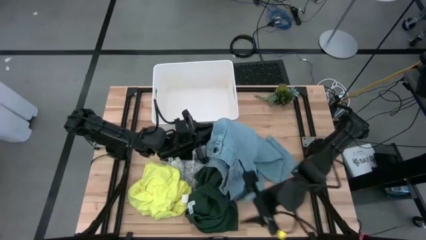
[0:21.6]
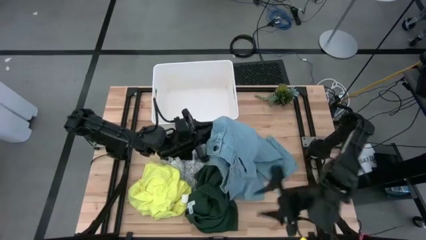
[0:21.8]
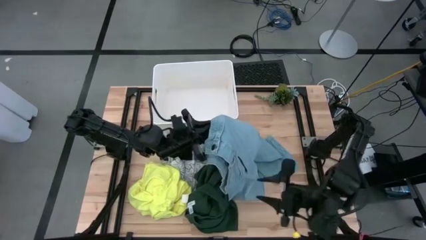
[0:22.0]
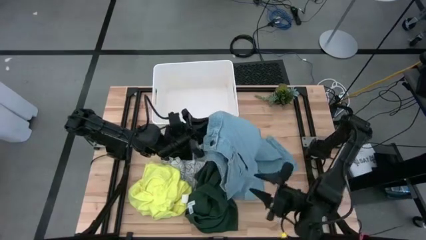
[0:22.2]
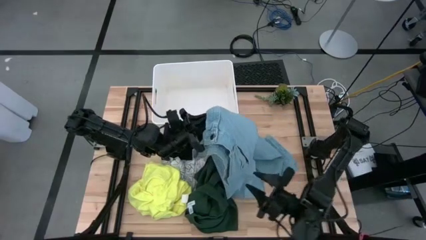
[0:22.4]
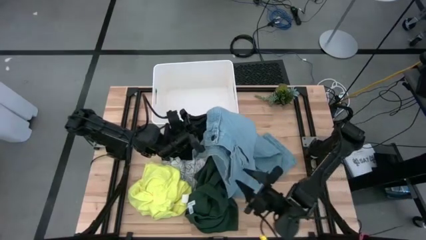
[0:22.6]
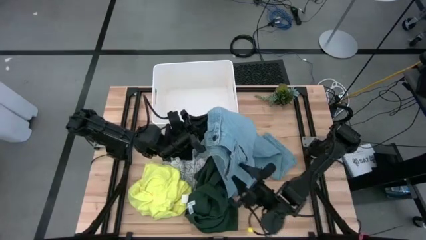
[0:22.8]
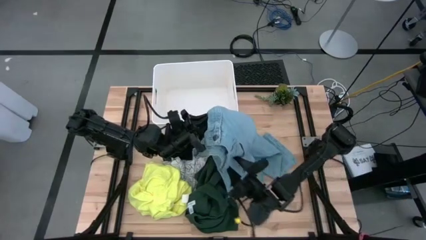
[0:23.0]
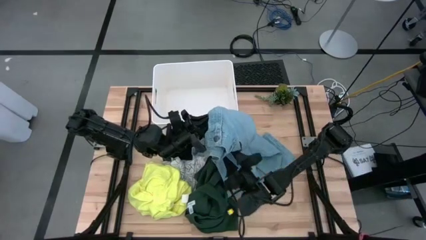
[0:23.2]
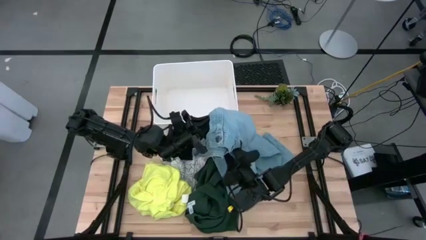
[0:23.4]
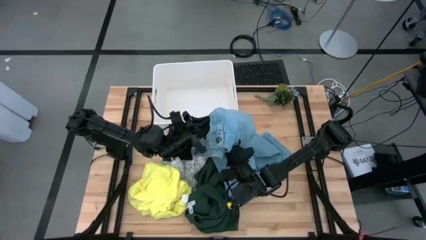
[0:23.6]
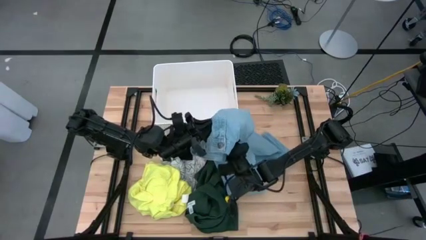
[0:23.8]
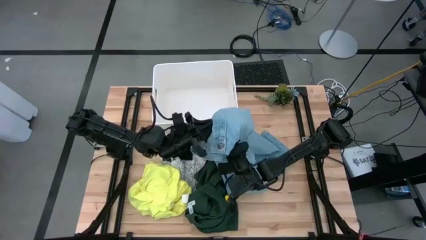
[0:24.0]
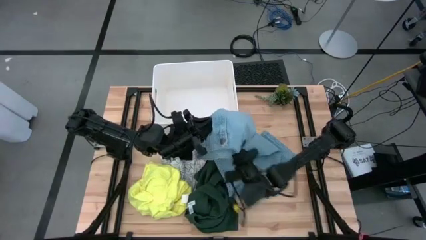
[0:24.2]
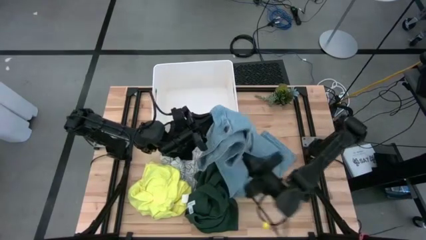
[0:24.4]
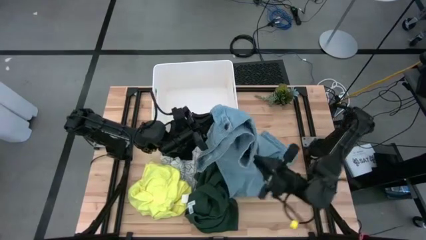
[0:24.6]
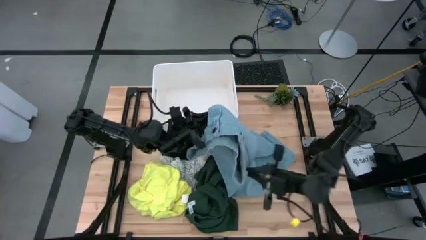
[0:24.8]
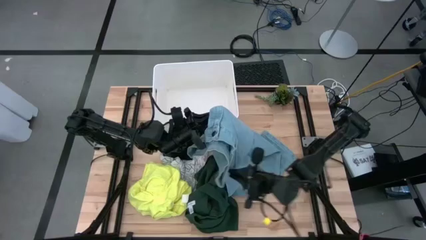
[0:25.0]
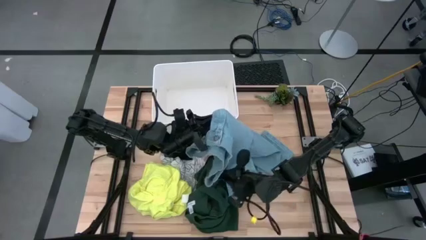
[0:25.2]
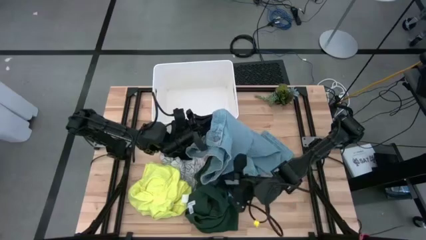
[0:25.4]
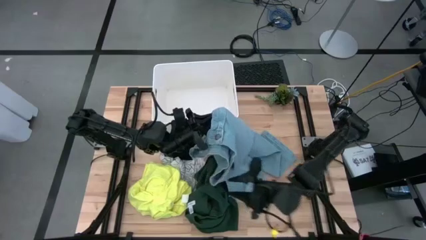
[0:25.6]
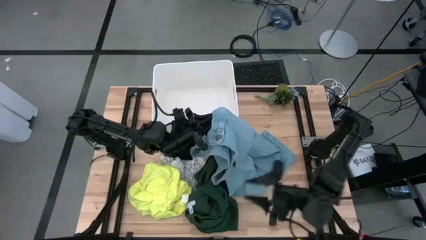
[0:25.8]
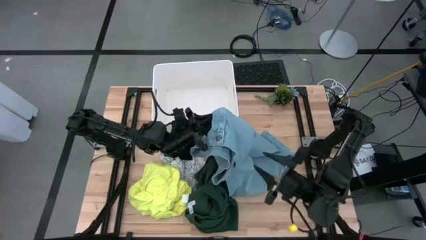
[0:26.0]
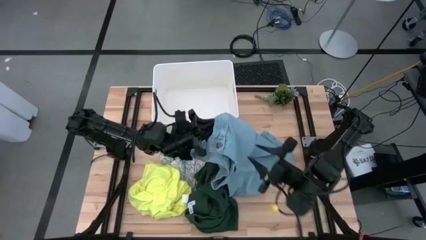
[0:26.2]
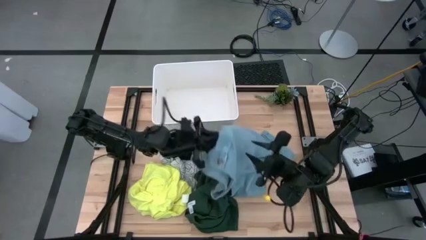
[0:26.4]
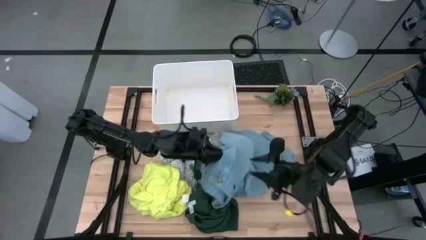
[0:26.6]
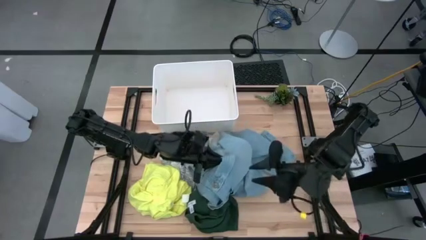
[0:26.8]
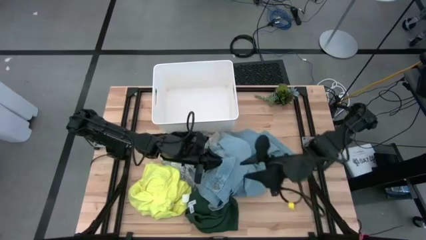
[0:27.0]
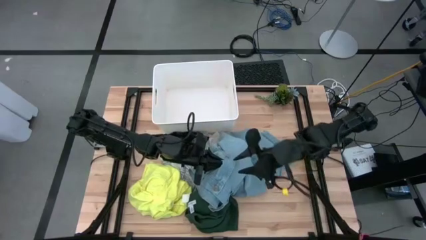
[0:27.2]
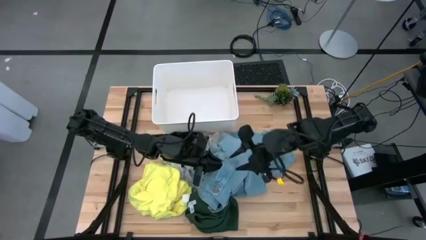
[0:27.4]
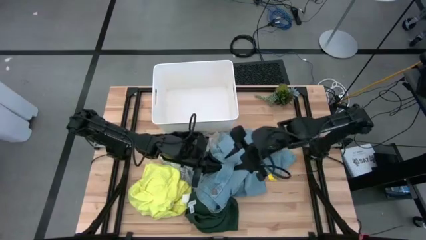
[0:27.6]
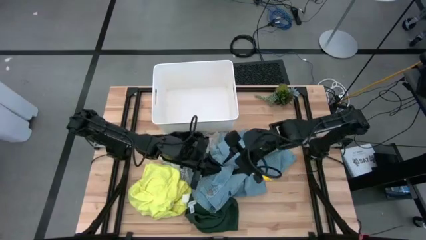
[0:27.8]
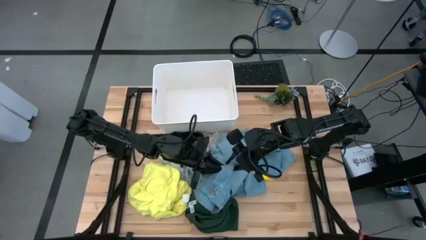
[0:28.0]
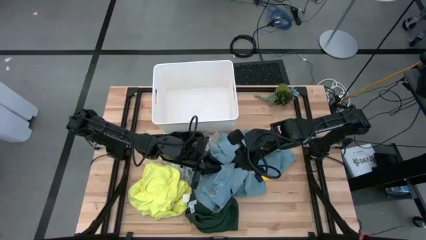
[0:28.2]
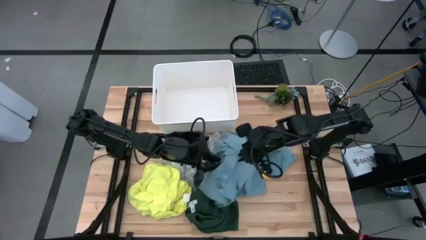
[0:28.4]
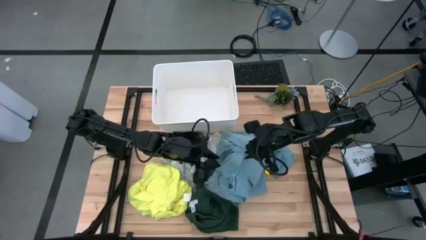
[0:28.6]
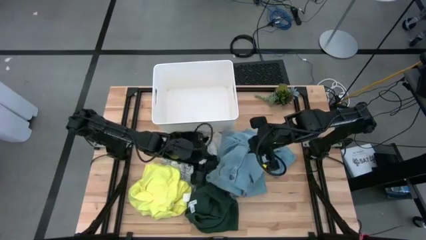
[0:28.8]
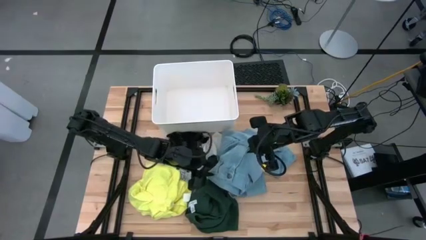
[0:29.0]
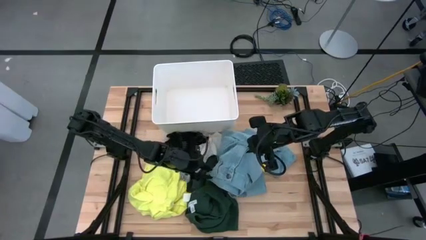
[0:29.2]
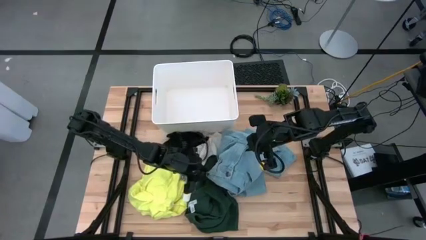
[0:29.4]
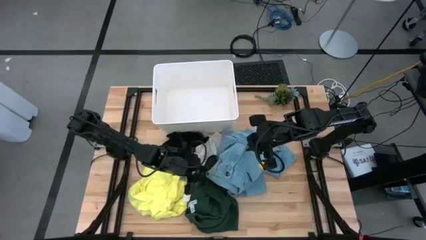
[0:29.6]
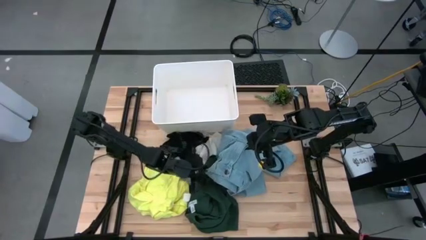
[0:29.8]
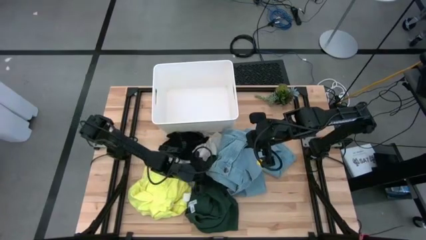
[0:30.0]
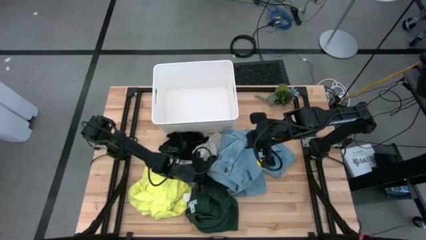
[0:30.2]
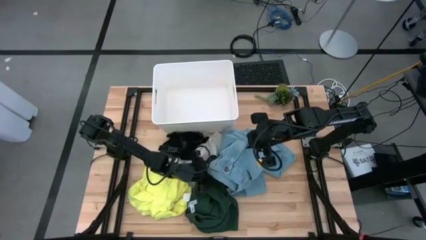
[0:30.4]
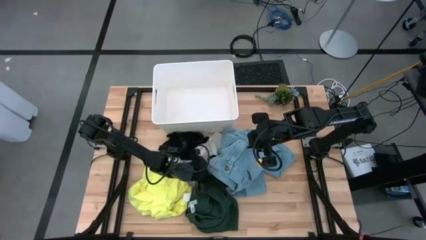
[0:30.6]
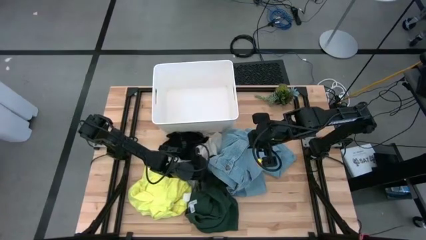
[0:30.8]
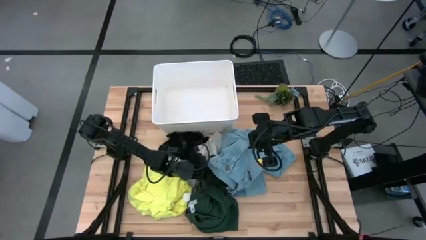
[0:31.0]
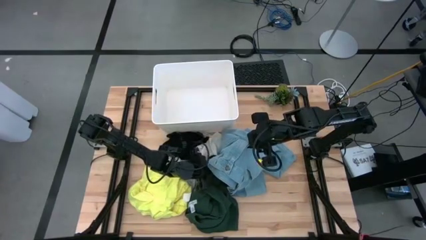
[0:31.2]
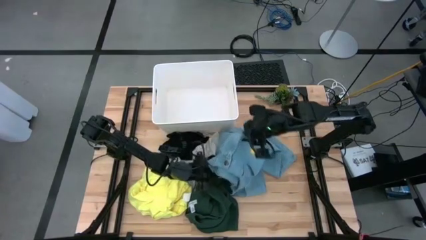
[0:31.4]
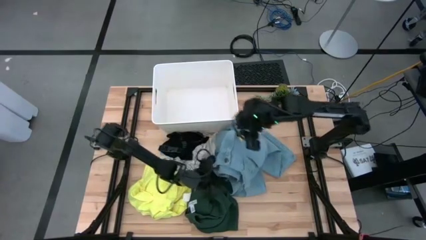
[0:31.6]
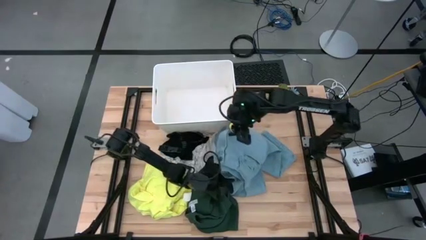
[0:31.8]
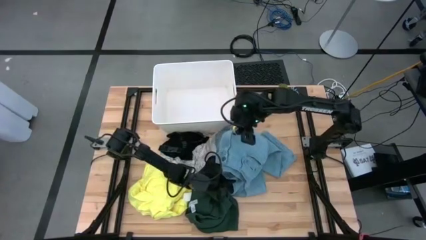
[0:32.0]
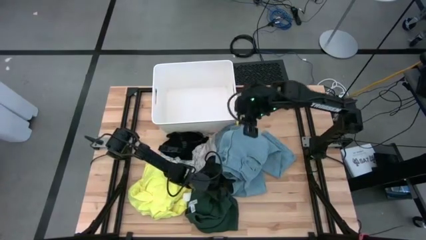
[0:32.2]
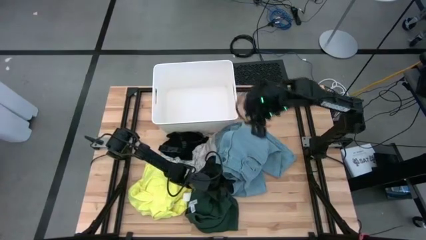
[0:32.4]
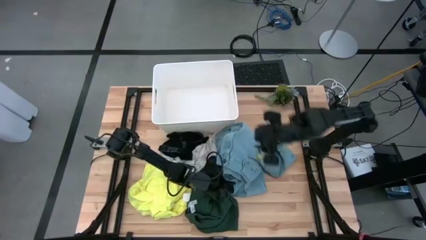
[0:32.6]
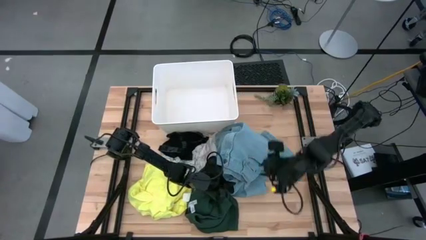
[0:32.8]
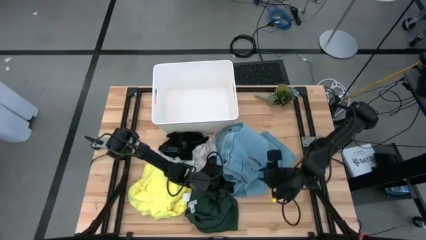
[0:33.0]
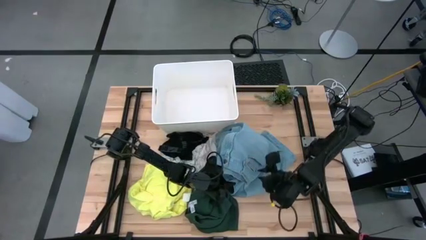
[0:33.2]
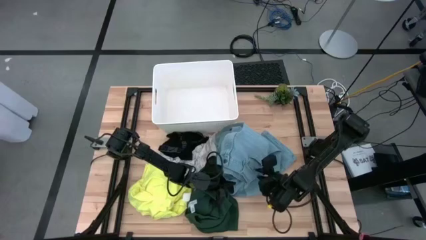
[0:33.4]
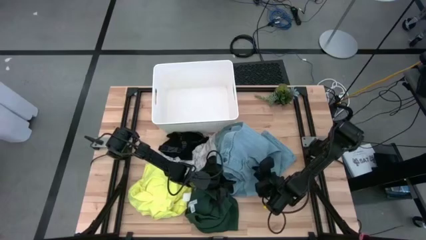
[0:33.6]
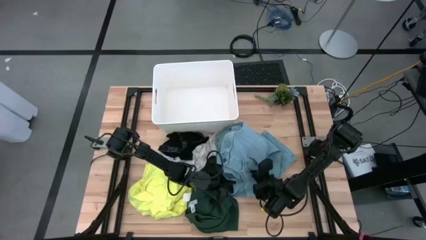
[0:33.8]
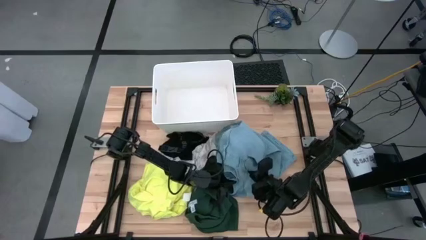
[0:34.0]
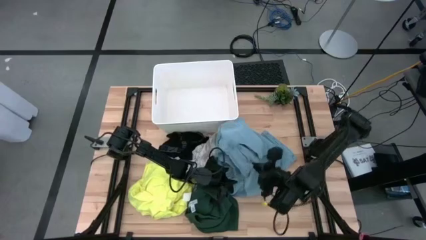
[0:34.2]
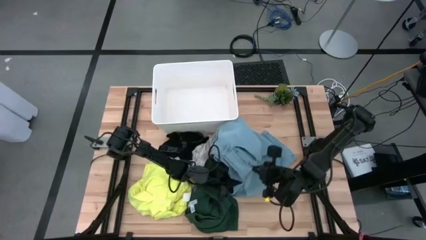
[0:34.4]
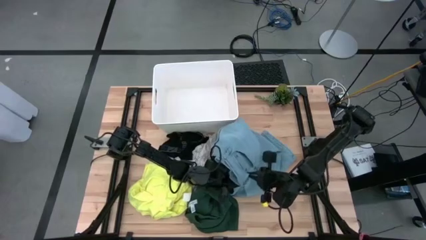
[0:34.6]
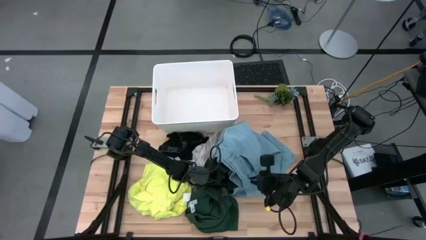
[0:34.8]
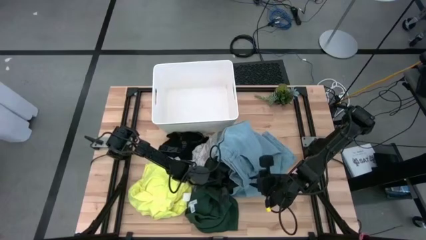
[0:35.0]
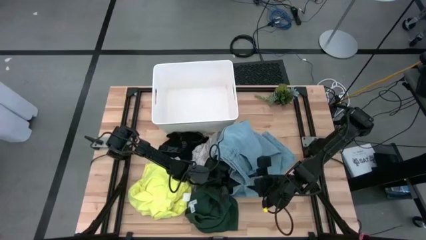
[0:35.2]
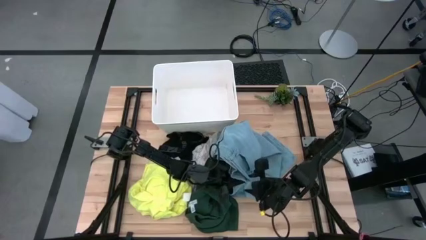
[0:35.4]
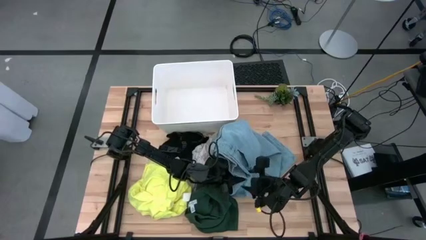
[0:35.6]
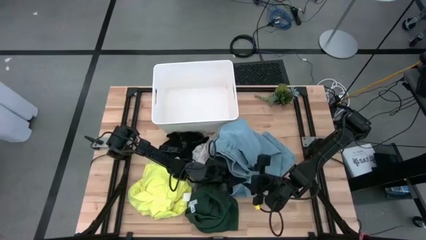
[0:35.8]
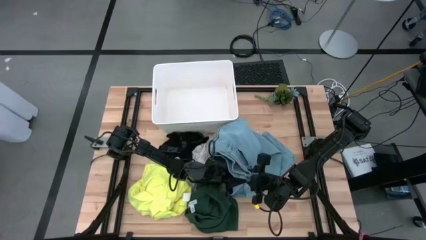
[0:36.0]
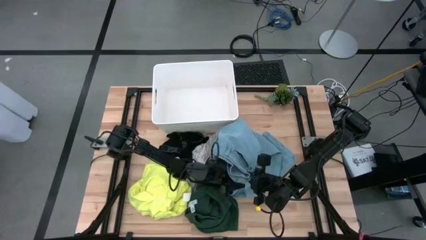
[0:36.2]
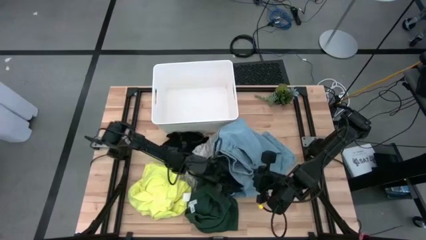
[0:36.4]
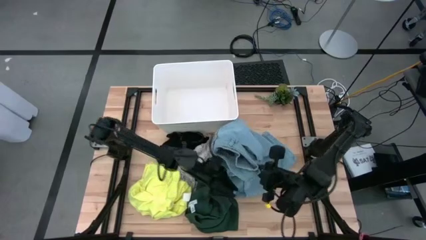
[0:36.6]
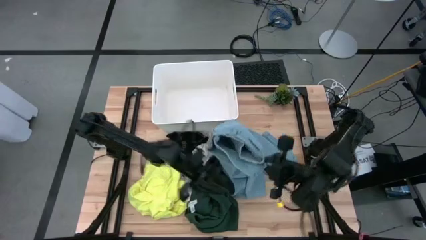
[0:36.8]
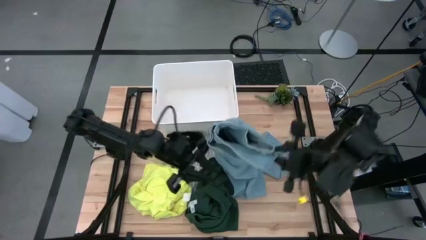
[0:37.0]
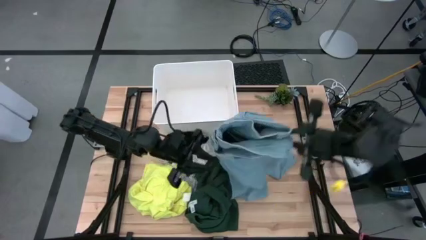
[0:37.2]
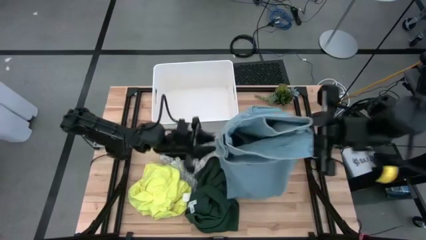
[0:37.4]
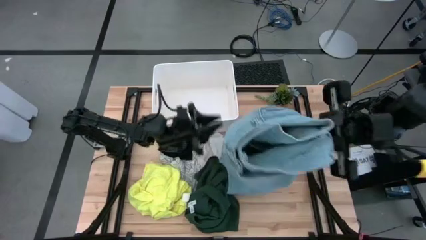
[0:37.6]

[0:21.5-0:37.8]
Task: Fold laundry
Fold the denim pants
